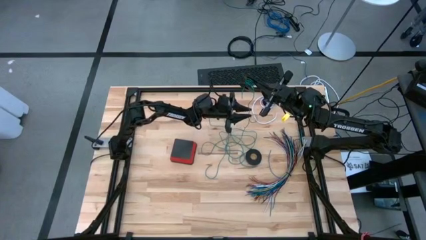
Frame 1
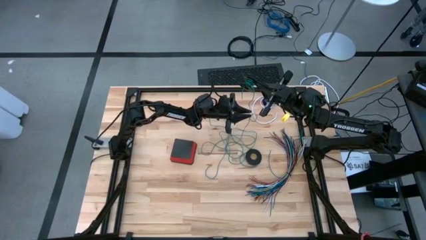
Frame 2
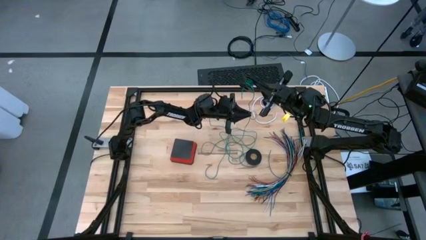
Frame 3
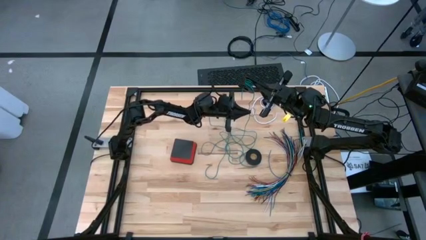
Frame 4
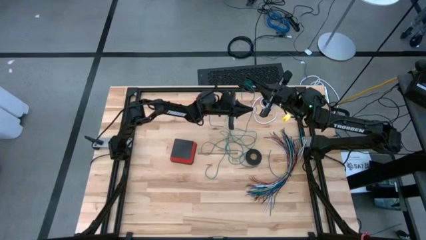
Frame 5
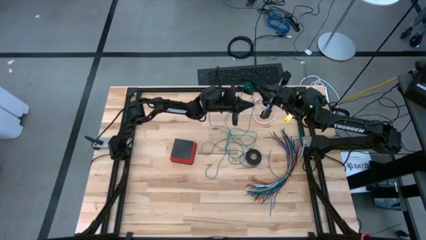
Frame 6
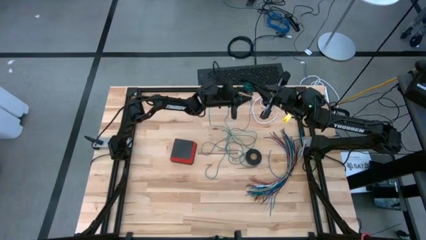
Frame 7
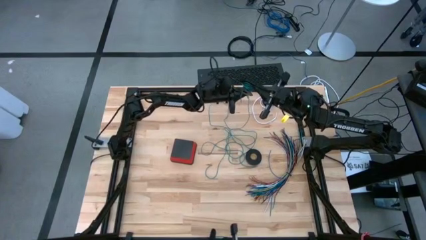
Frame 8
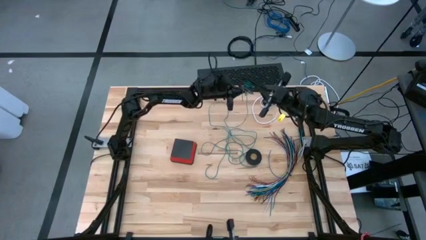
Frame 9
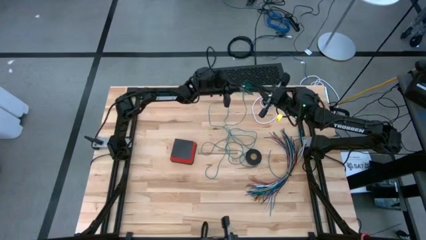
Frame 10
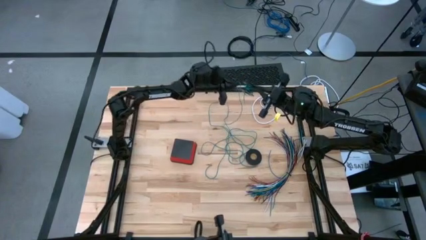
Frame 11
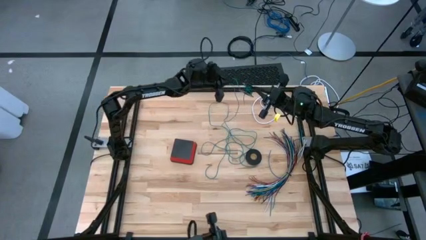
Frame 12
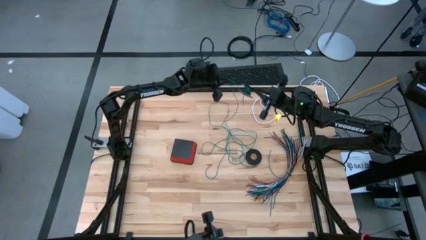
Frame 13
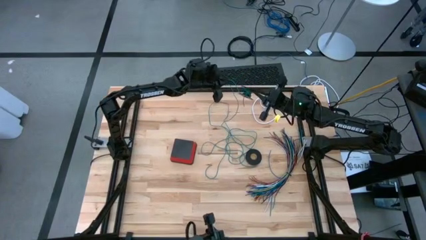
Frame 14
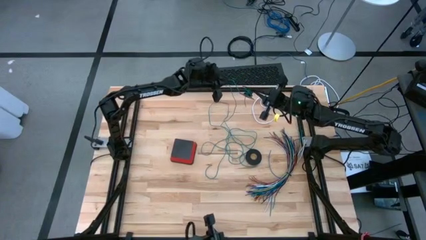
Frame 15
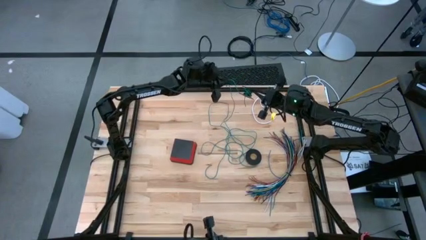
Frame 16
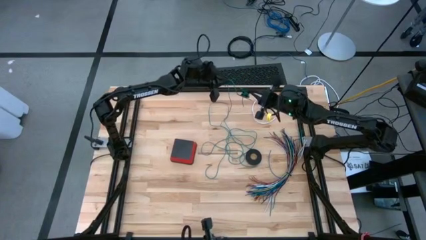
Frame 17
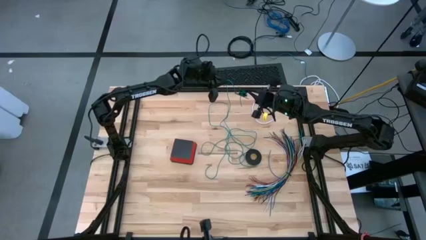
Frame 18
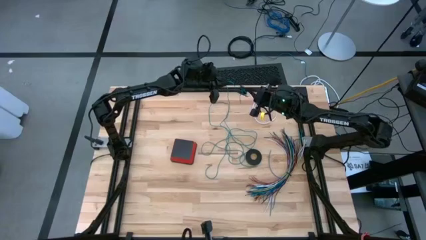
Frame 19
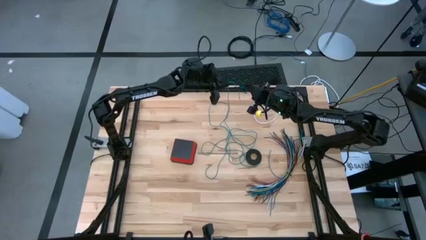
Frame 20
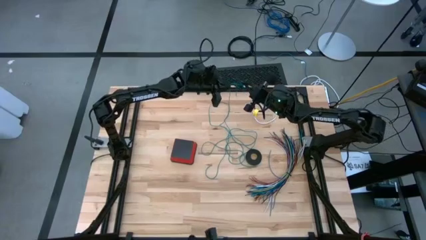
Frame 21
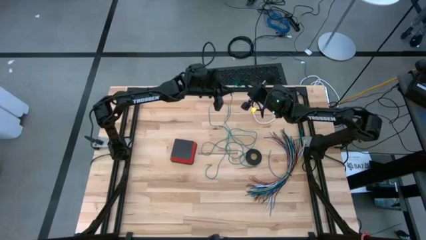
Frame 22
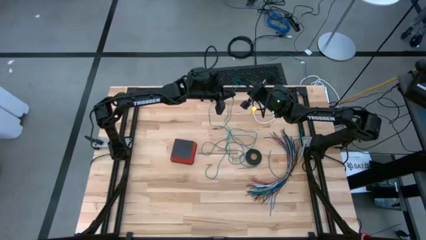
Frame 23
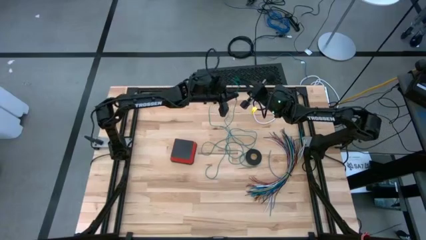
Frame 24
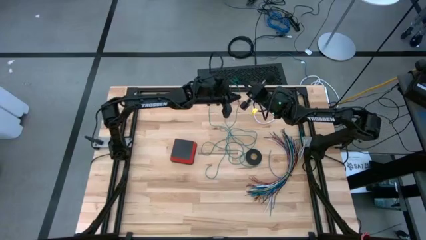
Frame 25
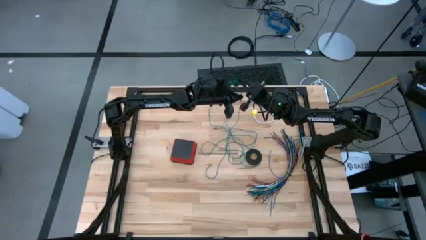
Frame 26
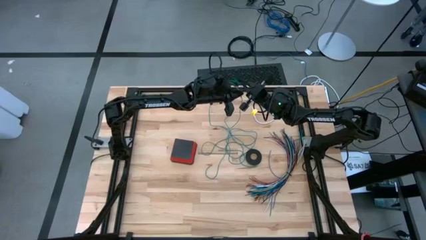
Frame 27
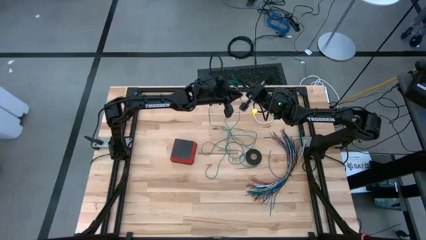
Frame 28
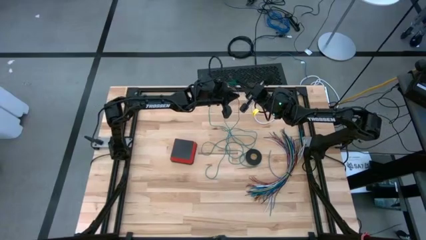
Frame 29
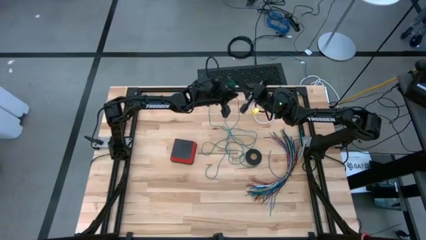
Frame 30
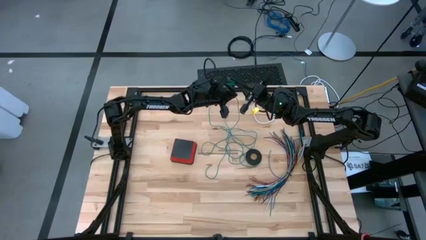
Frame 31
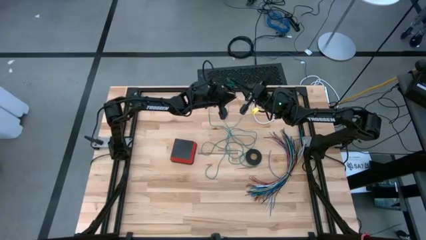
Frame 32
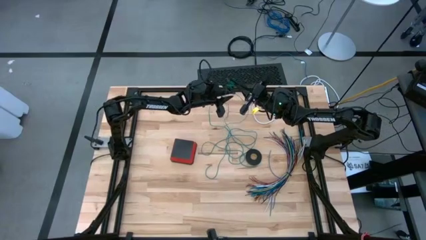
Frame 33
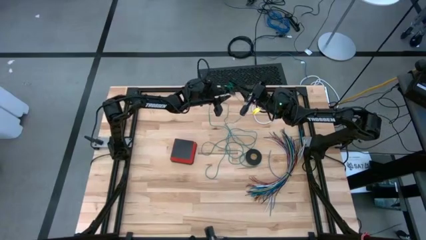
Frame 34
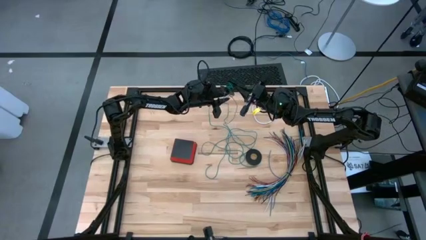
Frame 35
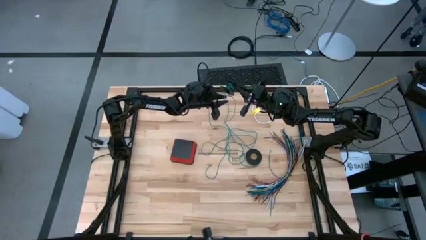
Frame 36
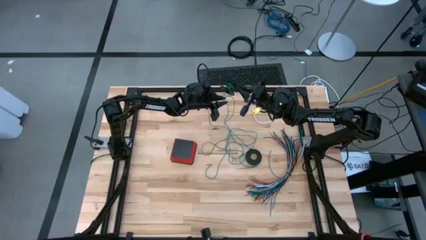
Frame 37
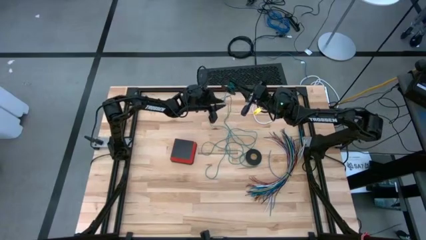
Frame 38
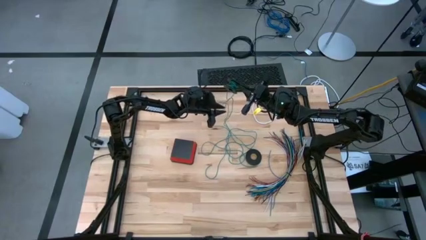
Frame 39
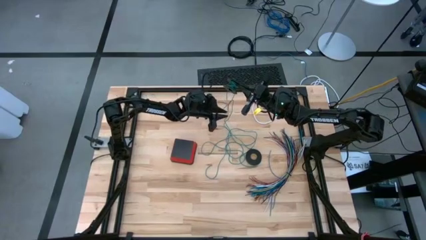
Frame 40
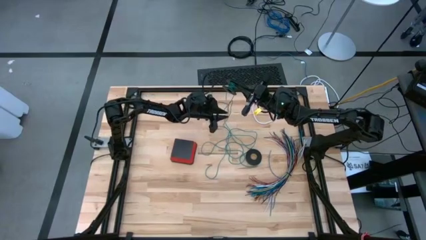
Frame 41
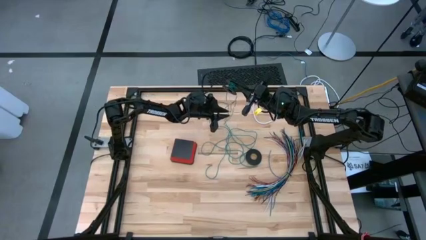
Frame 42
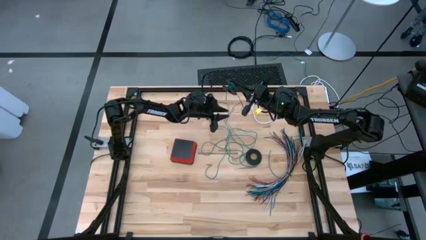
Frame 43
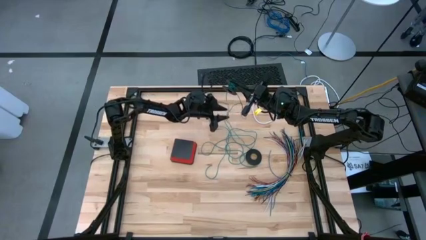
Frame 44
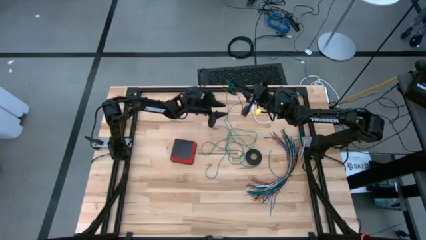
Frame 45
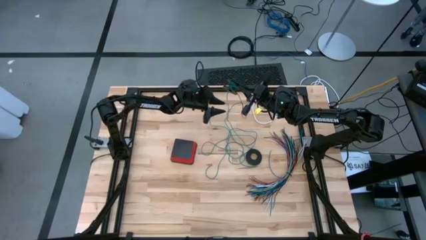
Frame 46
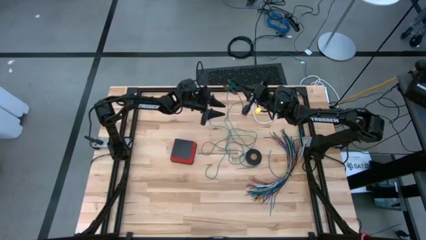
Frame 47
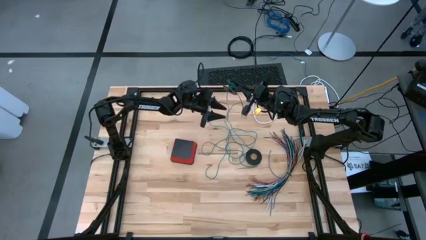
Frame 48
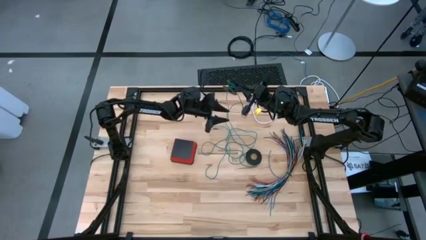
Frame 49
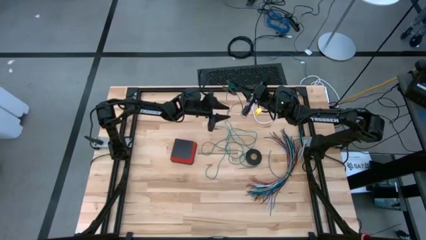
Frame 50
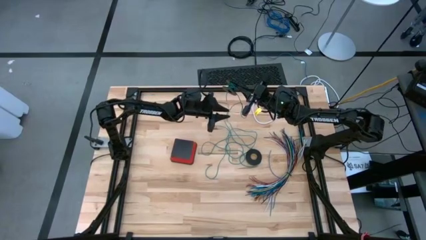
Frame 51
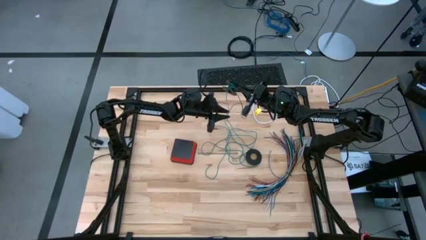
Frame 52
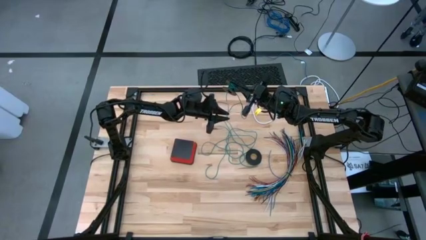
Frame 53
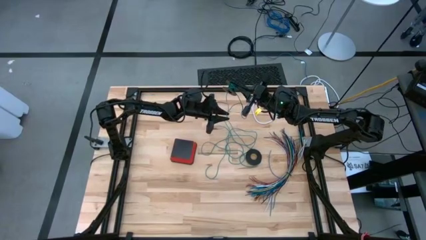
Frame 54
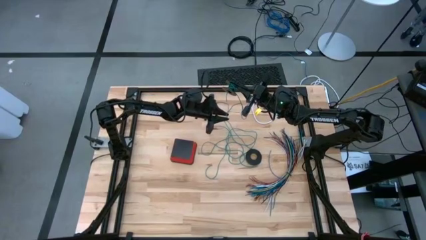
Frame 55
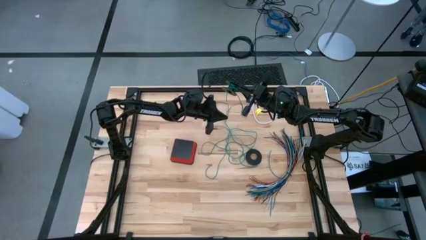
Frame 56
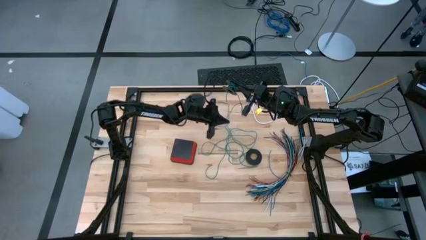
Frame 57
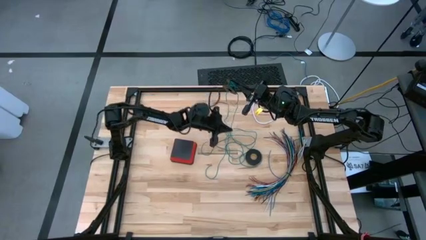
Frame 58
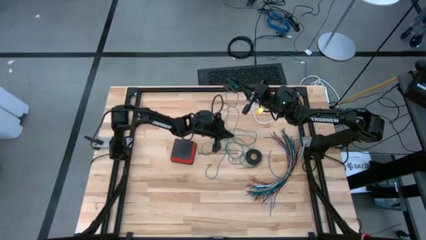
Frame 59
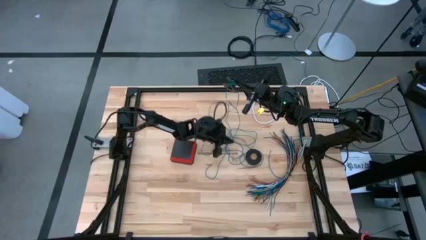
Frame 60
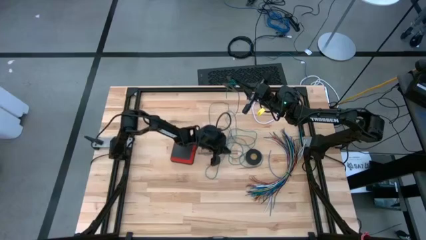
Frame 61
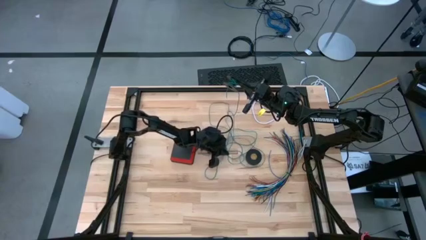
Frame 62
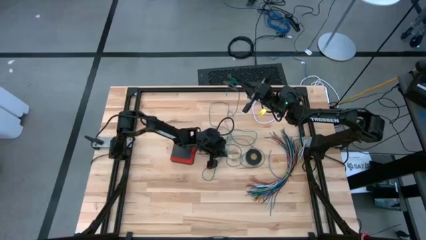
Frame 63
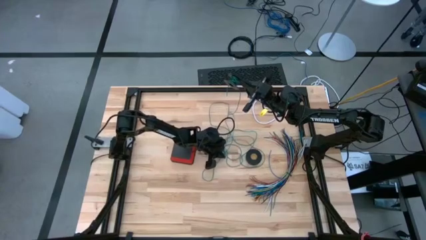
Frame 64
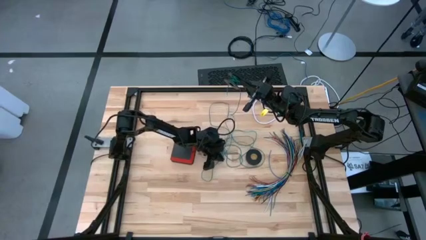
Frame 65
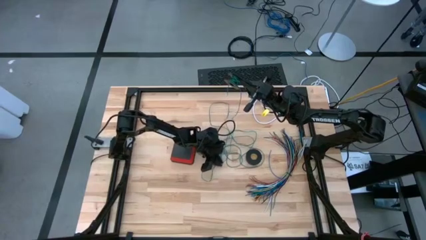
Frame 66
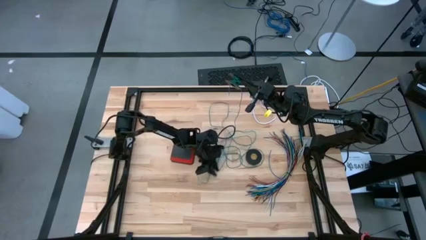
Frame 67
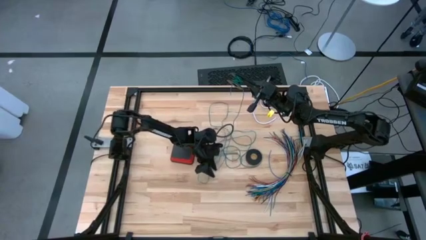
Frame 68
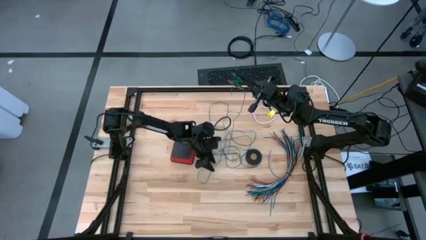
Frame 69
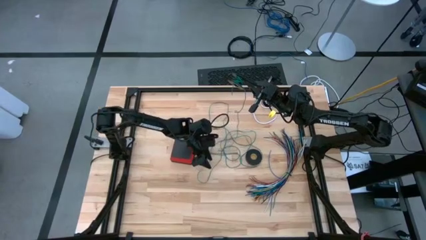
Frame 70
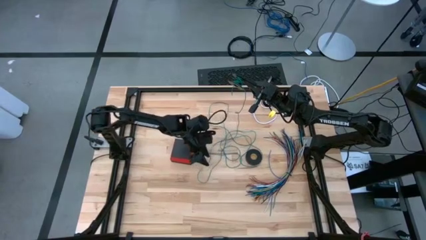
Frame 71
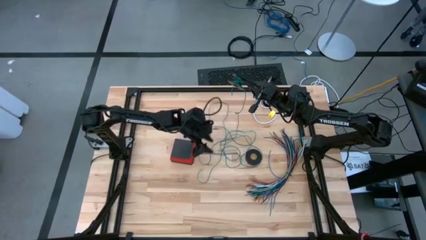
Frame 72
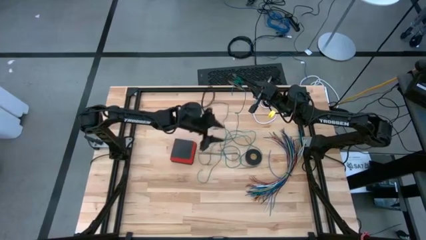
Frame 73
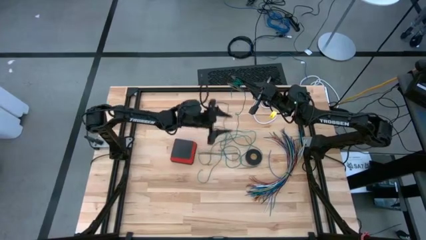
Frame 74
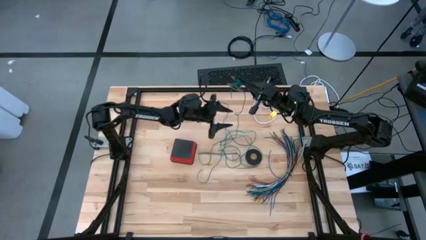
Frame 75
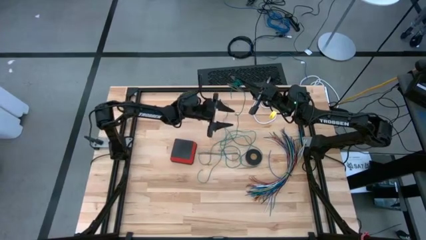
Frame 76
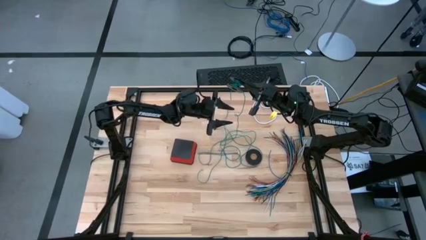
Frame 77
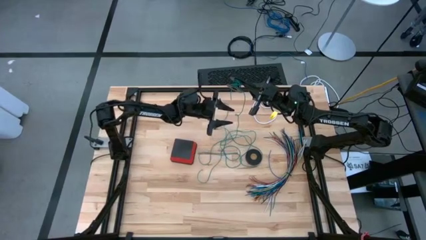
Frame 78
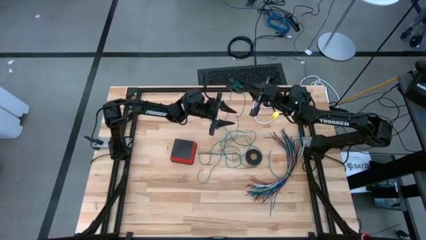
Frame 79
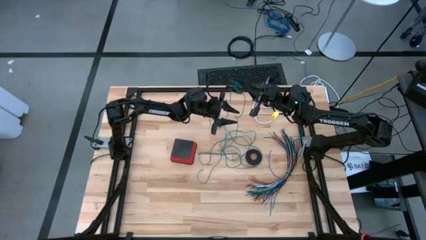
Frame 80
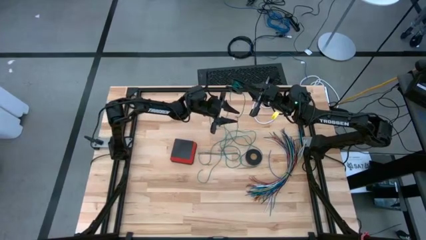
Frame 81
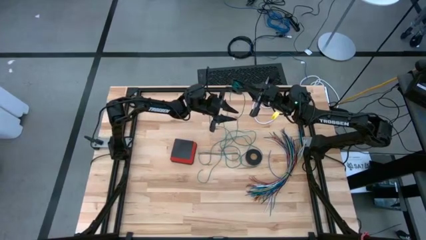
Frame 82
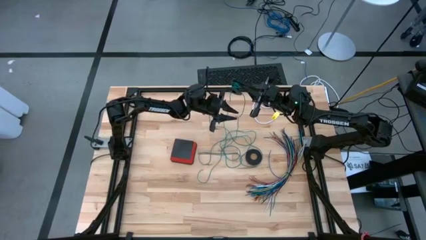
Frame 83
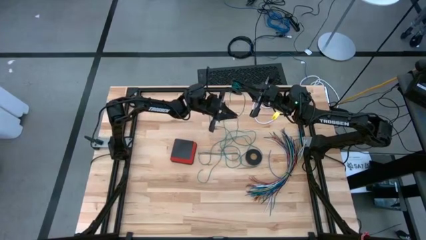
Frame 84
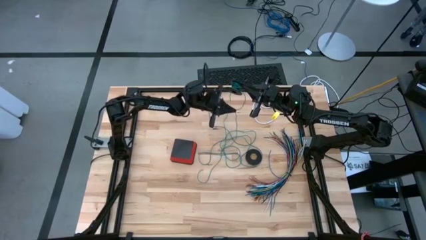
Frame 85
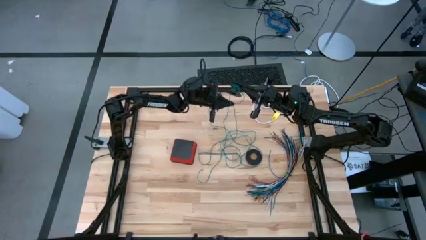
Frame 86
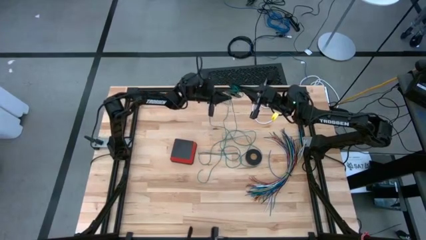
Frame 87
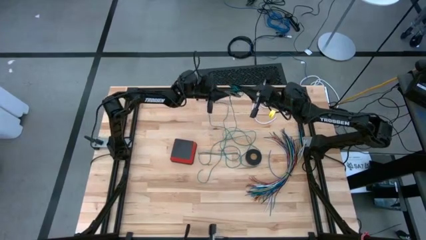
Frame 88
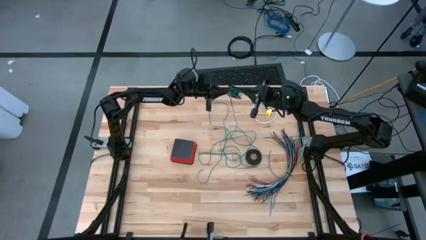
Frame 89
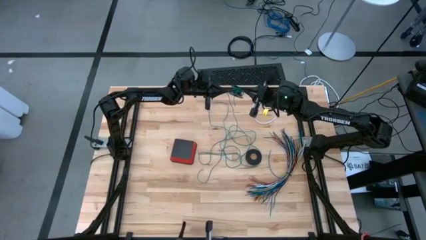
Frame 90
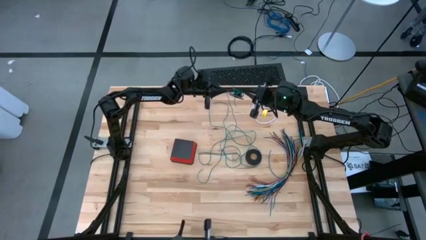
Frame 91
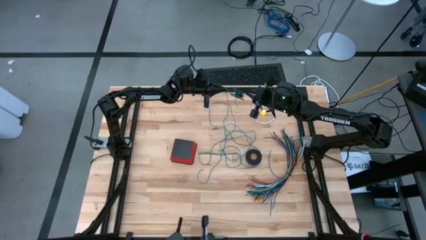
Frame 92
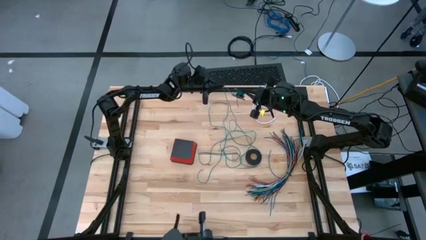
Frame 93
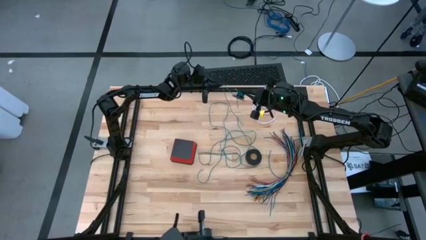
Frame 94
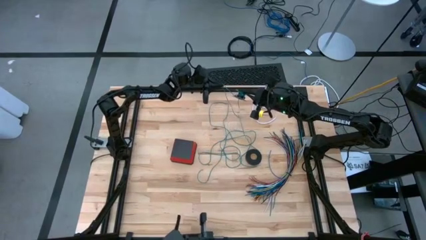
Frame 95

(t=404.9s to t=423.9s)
Task: Coiling cords
Coil the green wire cable on the spool
